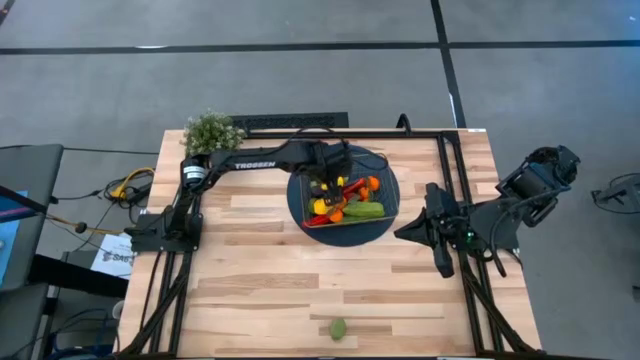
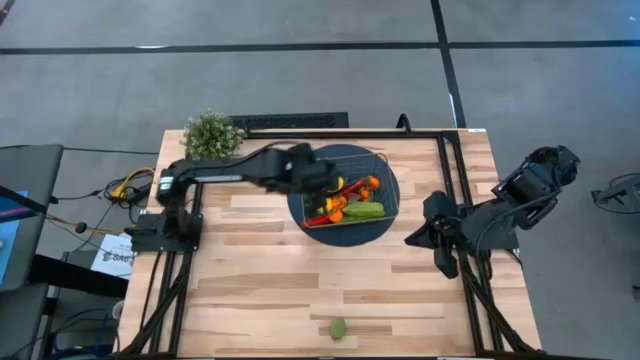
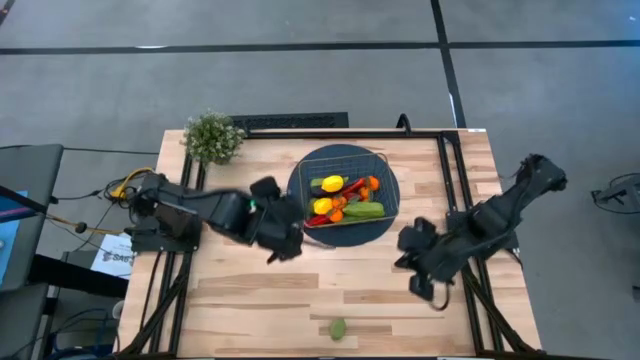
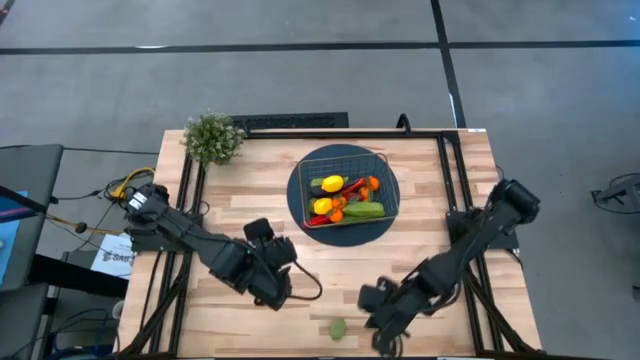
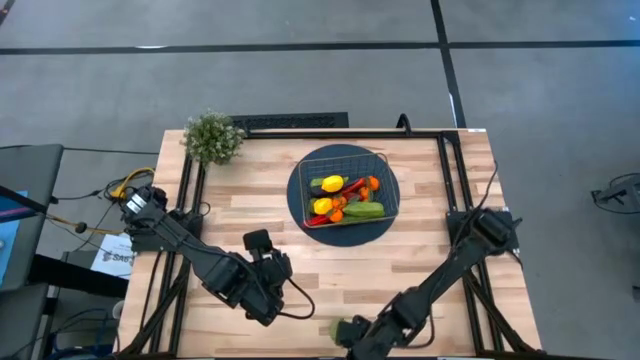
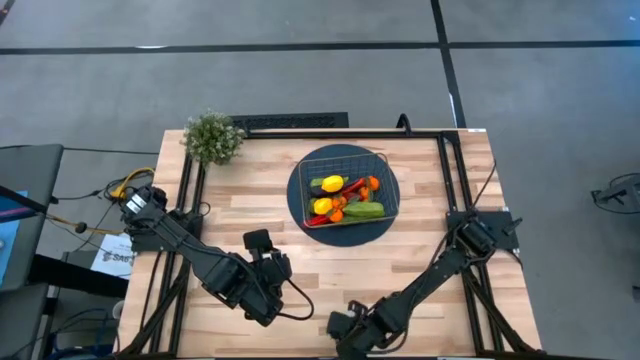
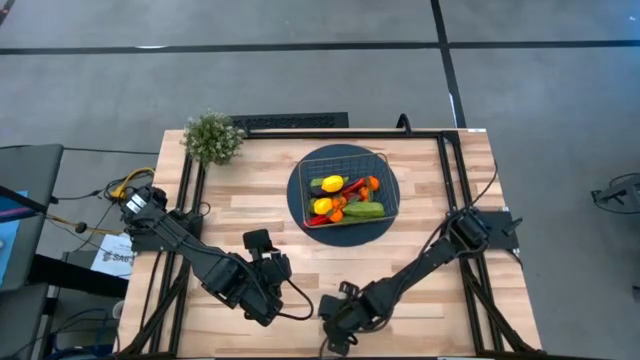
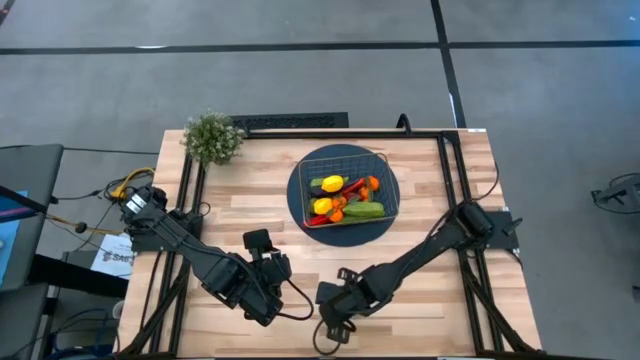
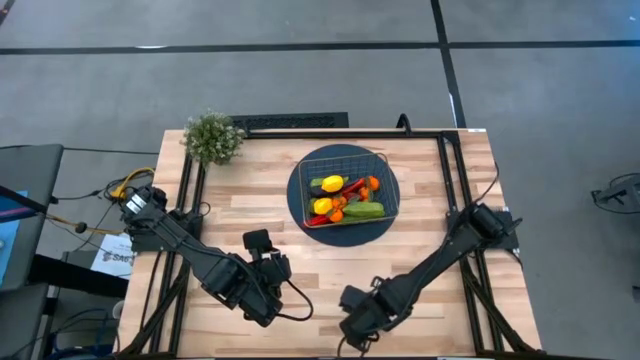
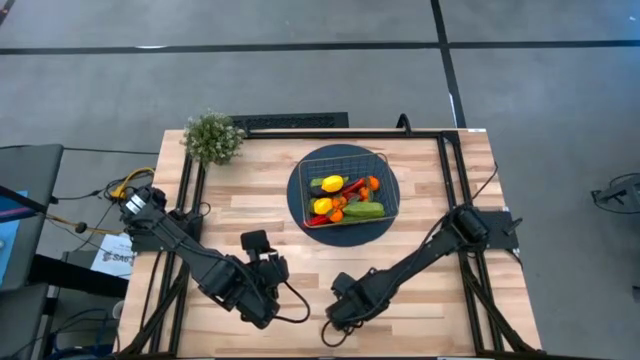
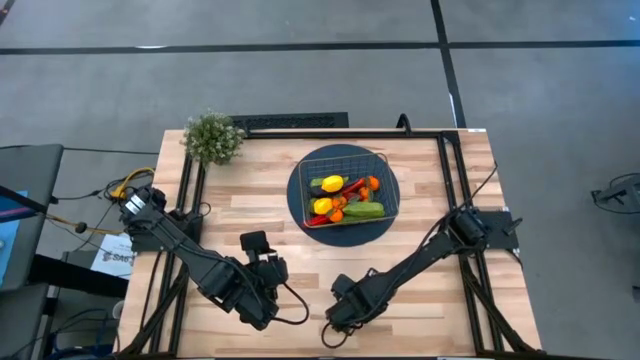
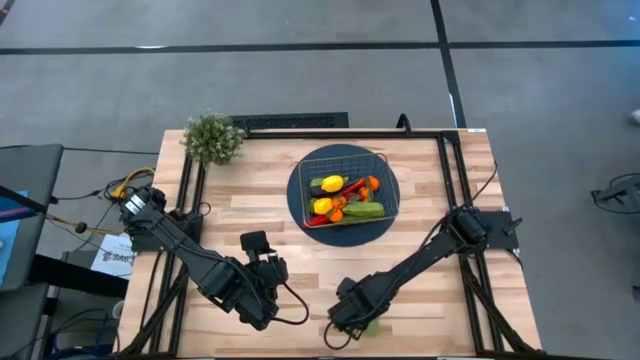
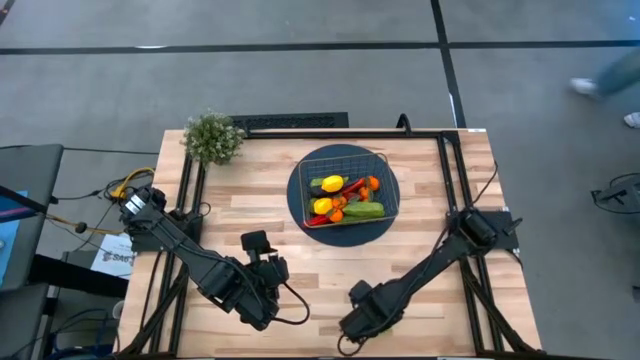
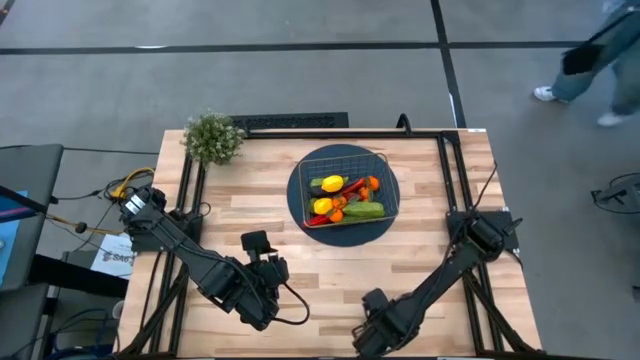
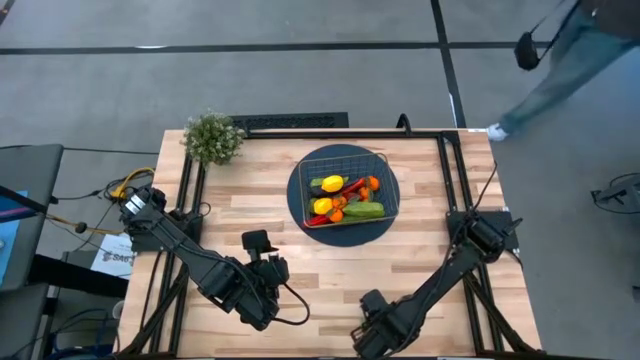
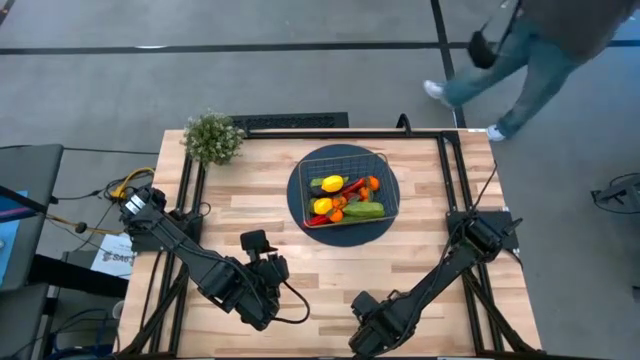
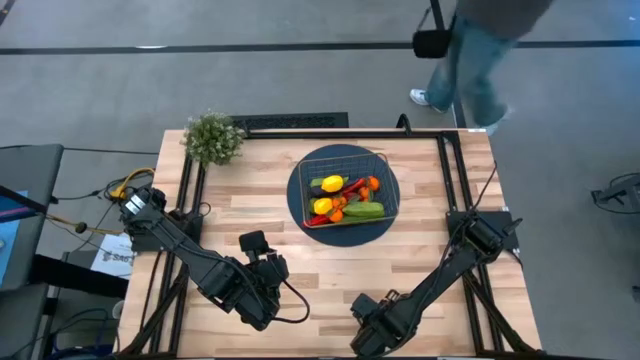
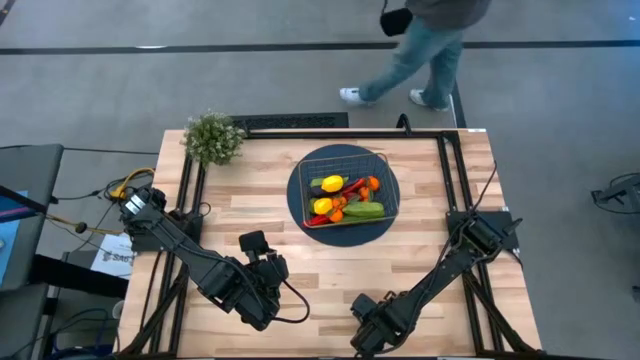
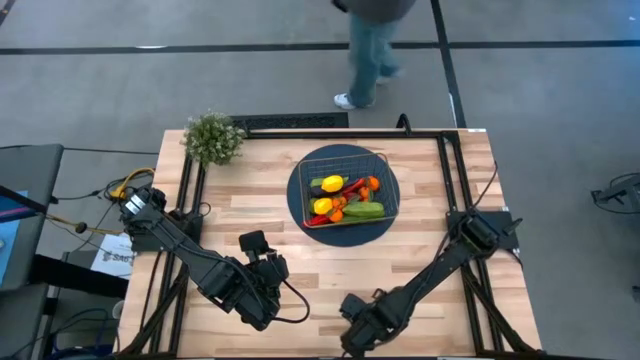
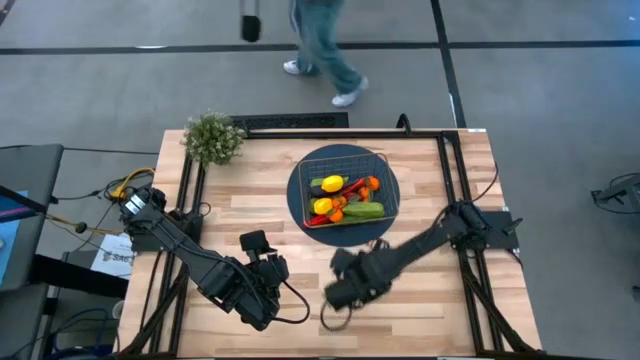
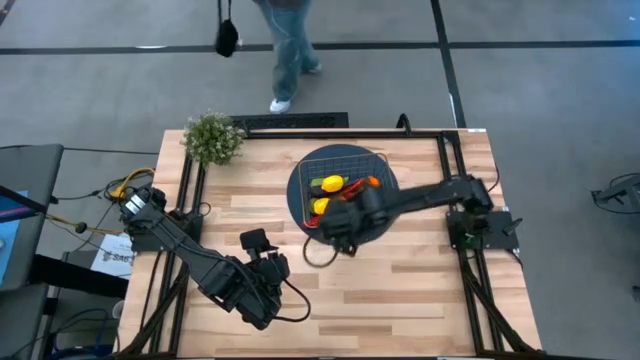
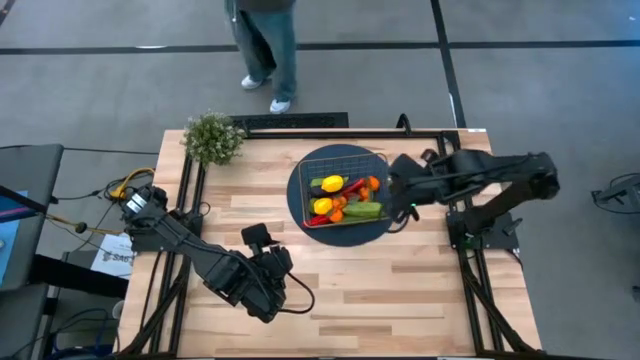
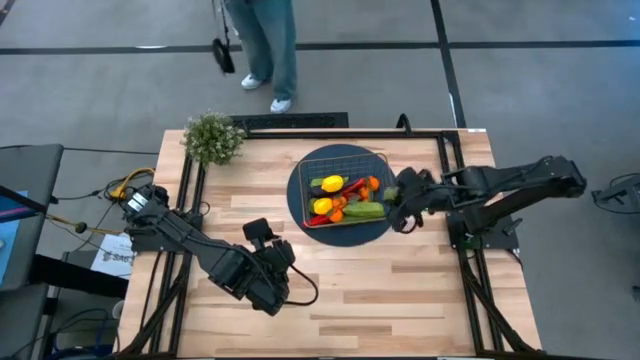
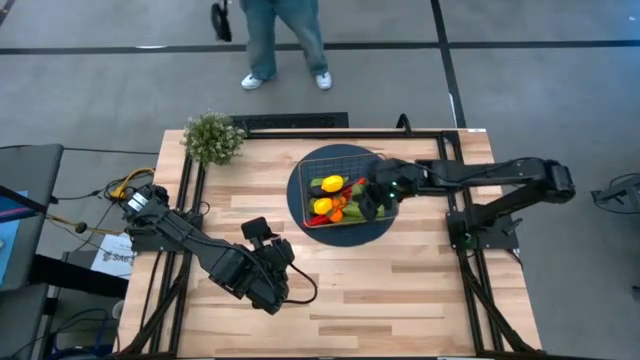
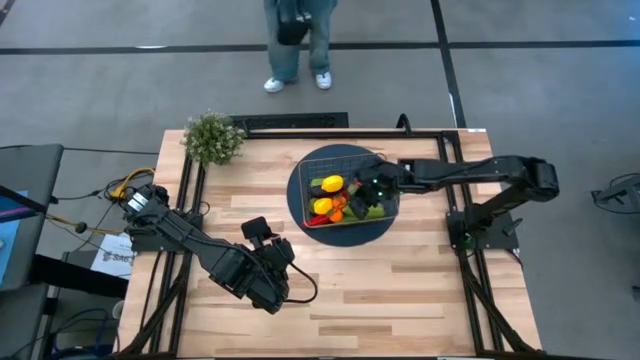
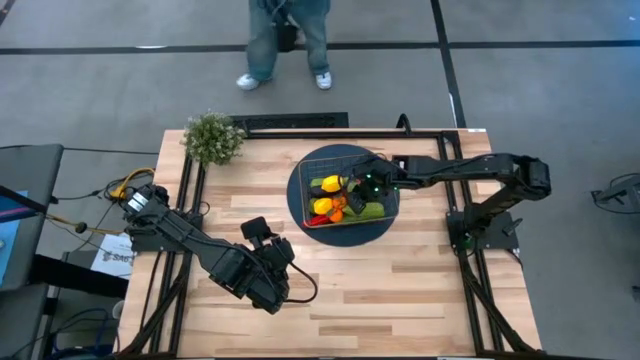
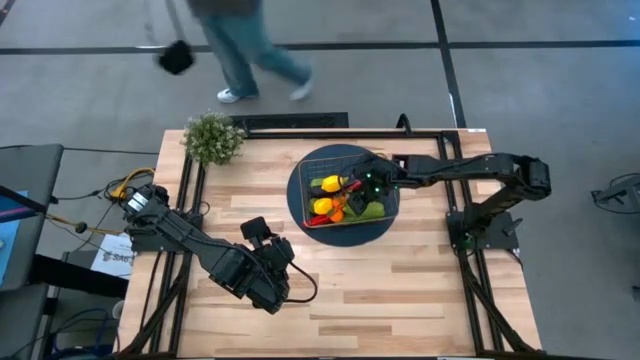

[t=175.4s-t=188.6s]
Task: Build produce basket
Put the green lime into the wire basket

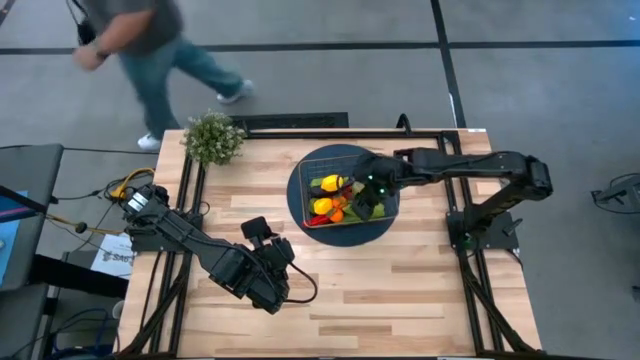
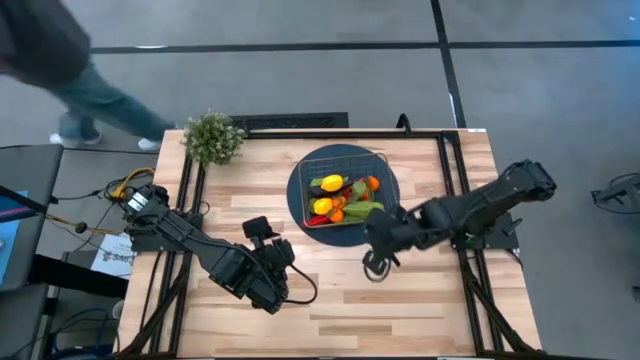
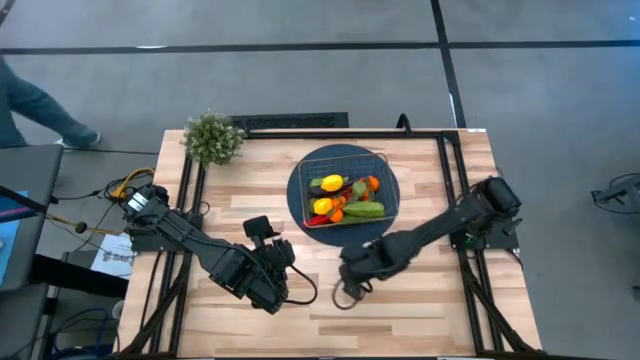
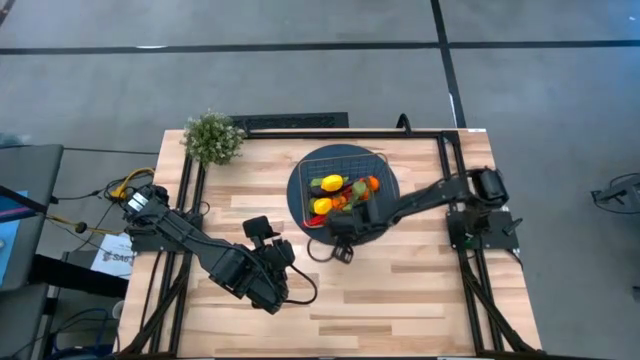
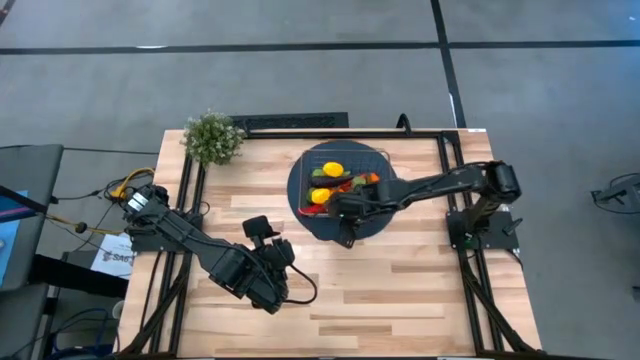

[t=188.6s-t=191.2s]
Adjust the wire basket

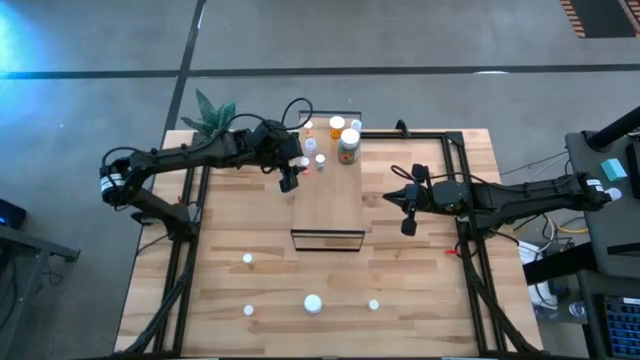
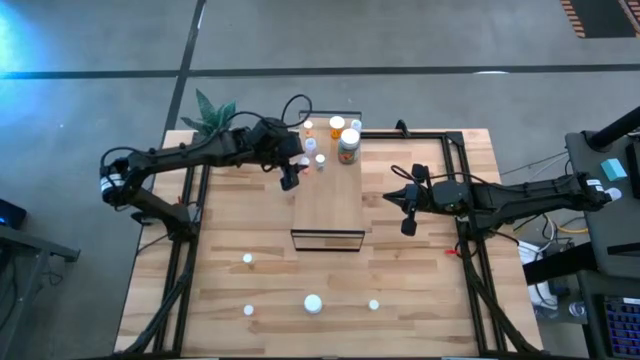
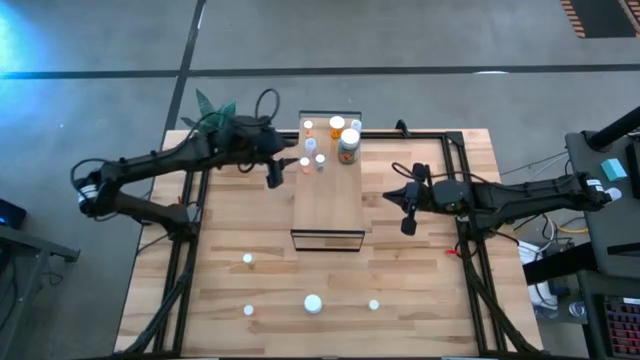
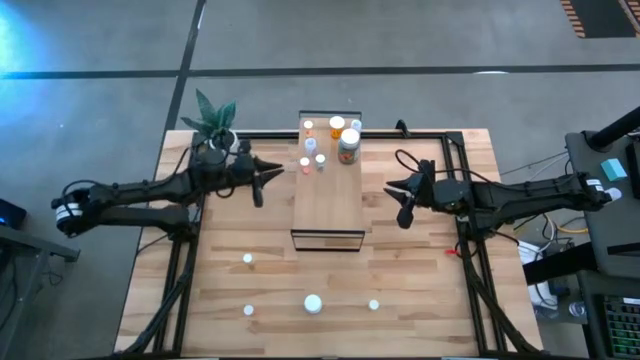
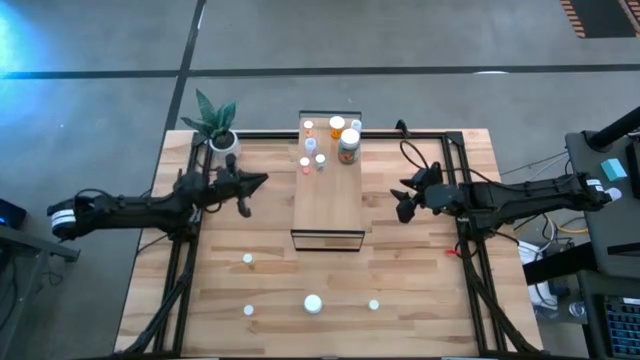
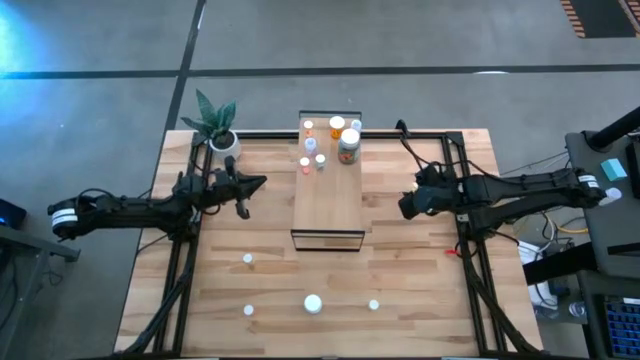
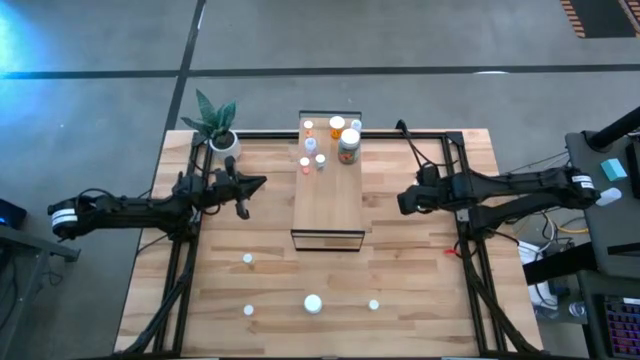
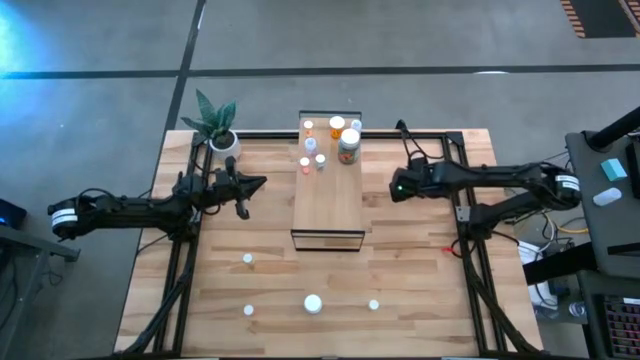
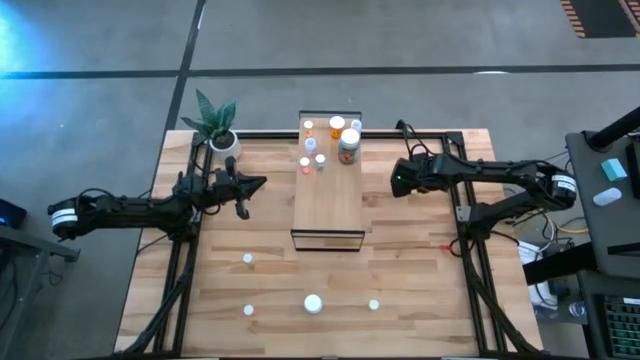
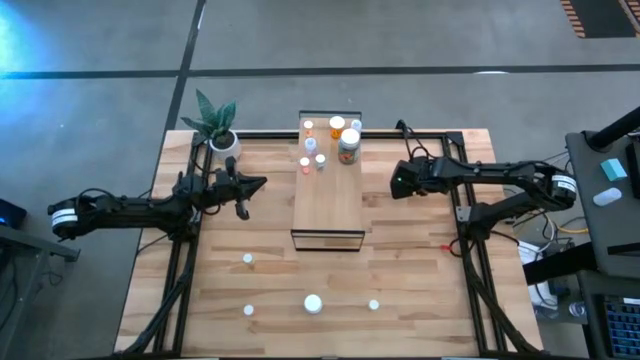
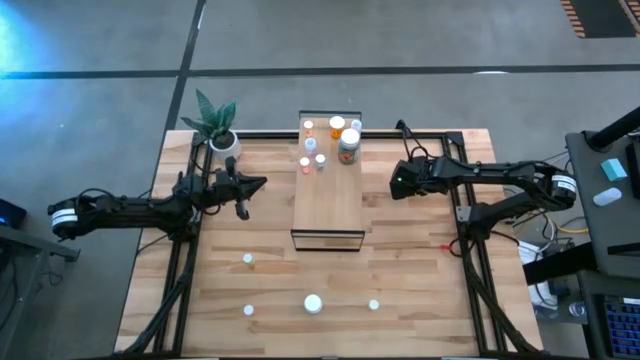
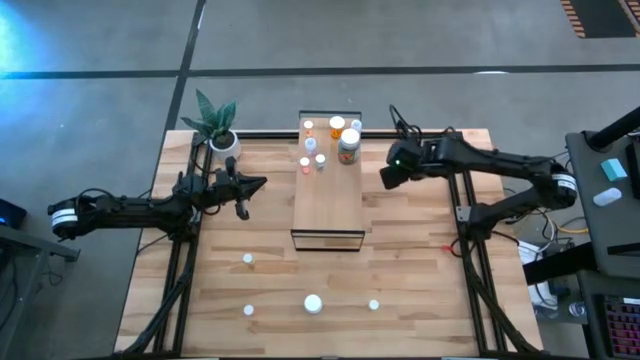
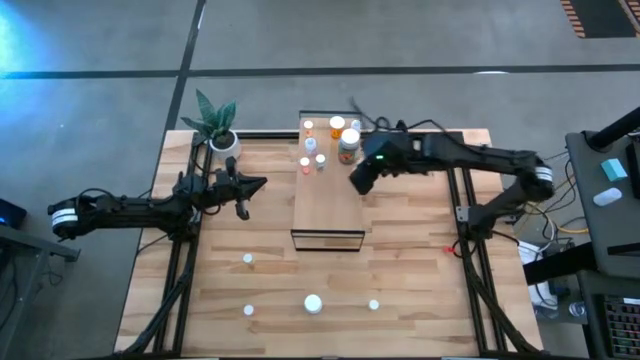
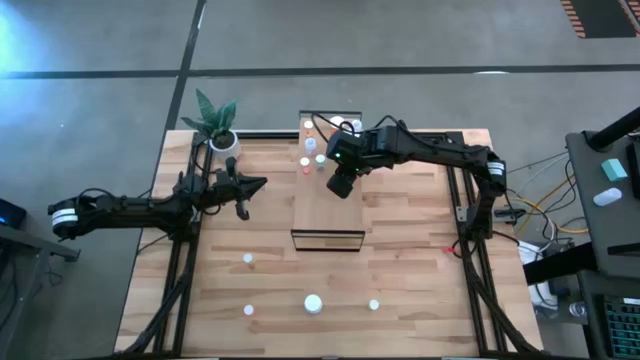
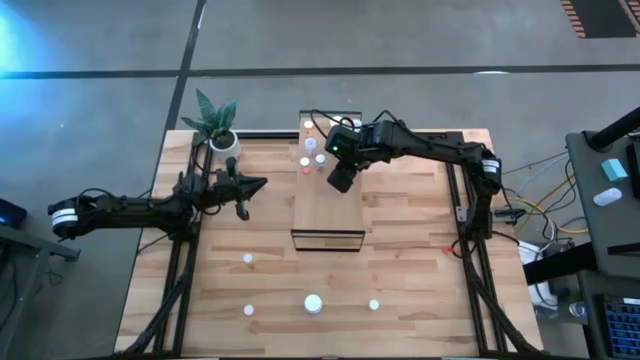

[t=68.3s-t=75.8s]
Task: Pick and place medicine bottles onto shelf by color
Put the top yellow pill bottle on the shelf
